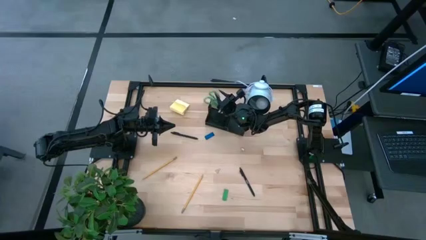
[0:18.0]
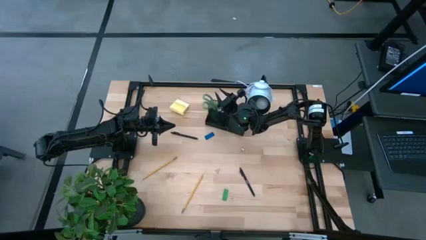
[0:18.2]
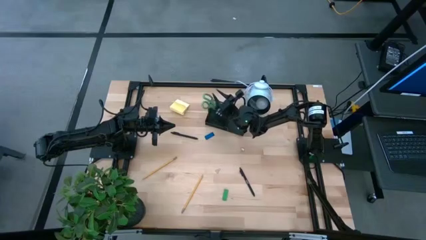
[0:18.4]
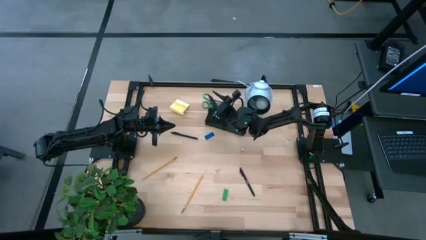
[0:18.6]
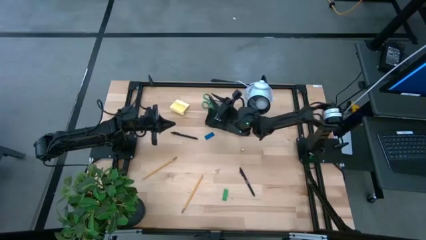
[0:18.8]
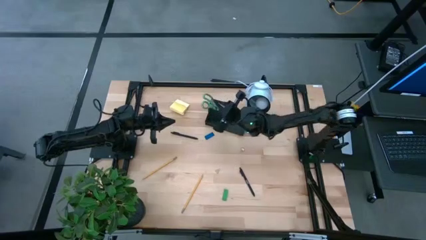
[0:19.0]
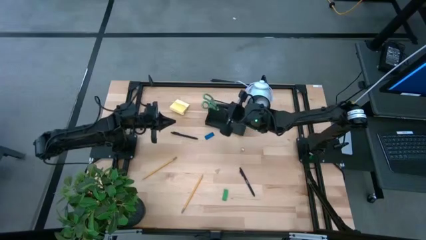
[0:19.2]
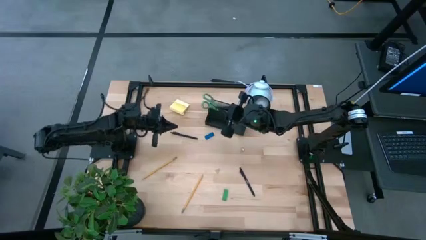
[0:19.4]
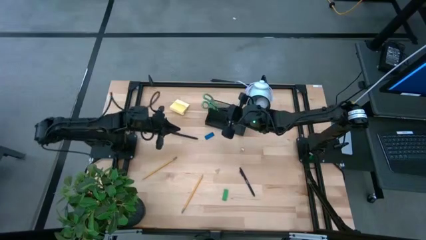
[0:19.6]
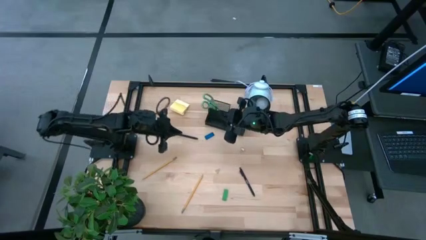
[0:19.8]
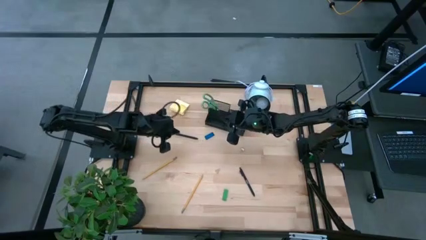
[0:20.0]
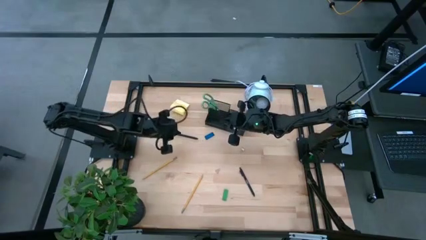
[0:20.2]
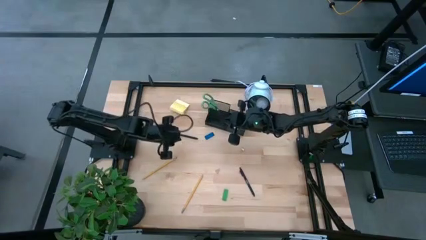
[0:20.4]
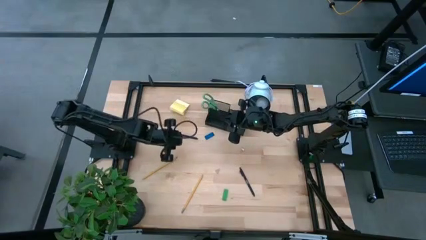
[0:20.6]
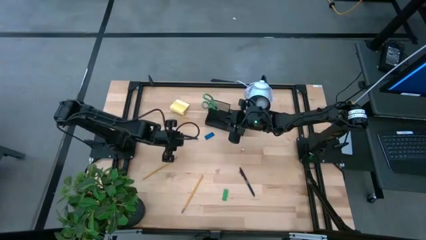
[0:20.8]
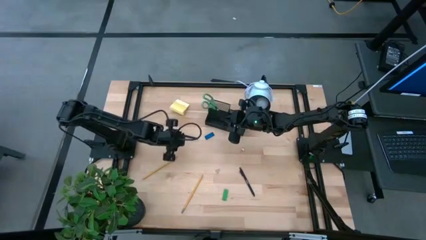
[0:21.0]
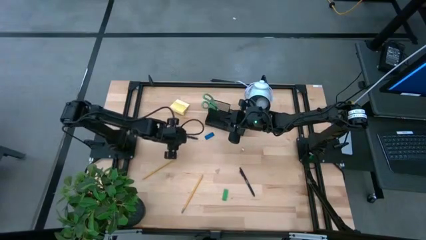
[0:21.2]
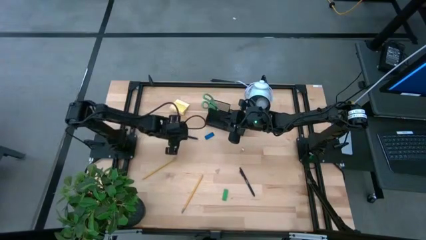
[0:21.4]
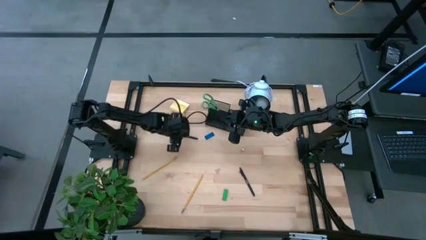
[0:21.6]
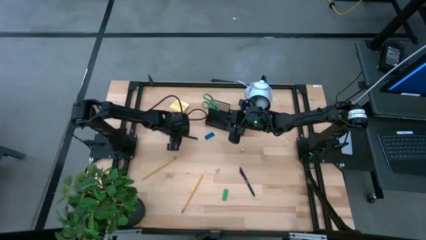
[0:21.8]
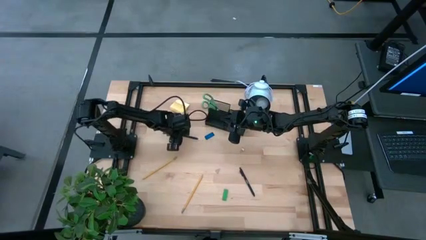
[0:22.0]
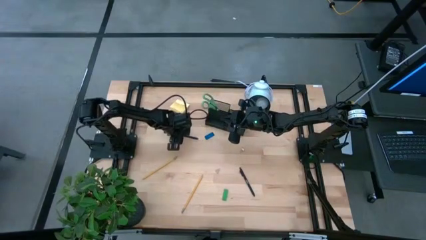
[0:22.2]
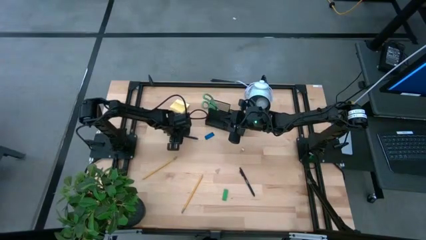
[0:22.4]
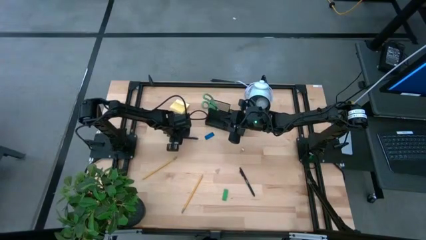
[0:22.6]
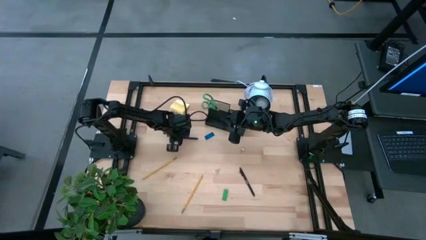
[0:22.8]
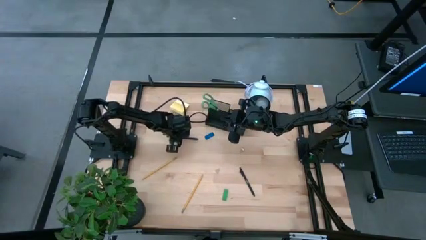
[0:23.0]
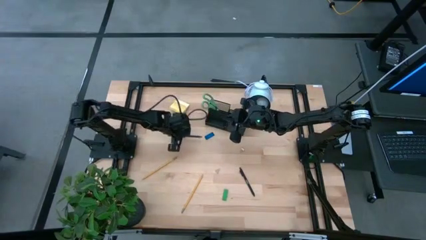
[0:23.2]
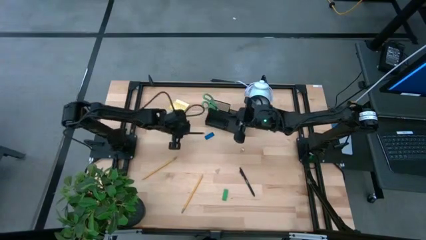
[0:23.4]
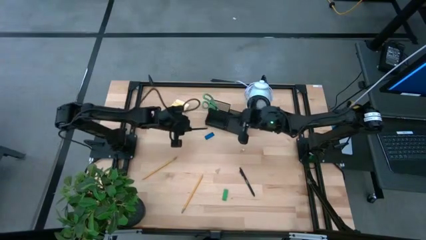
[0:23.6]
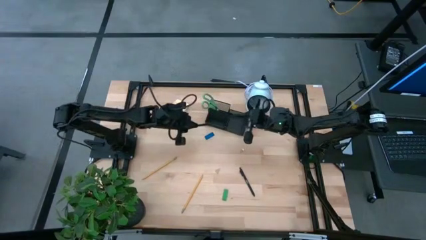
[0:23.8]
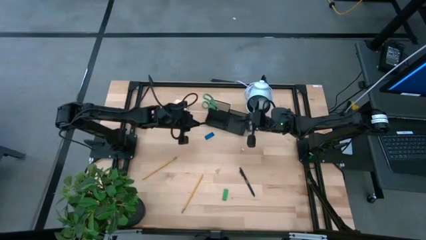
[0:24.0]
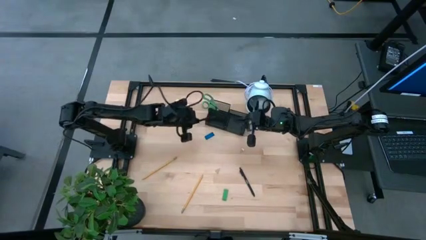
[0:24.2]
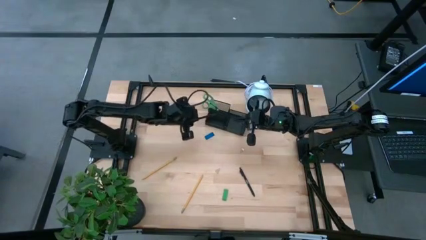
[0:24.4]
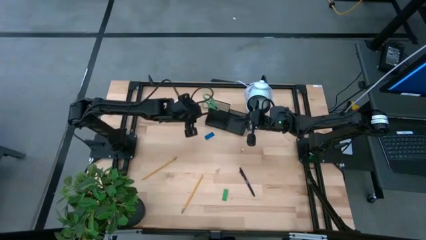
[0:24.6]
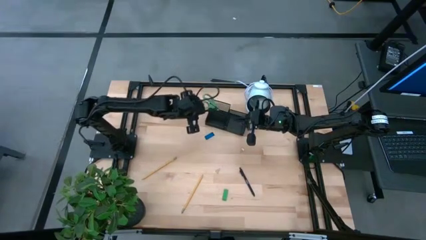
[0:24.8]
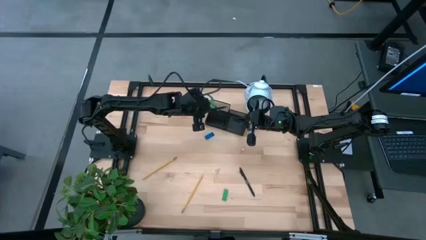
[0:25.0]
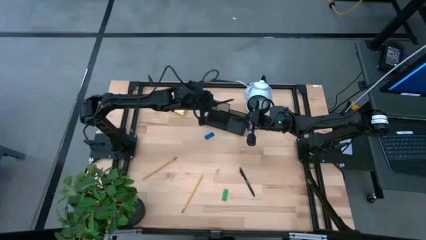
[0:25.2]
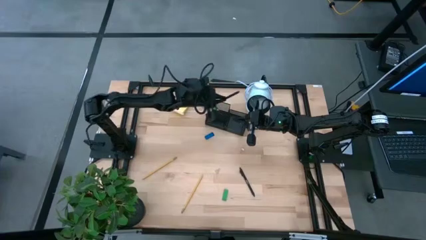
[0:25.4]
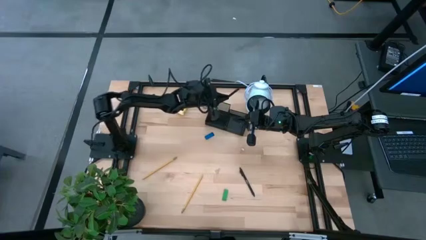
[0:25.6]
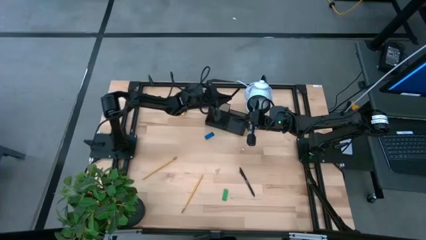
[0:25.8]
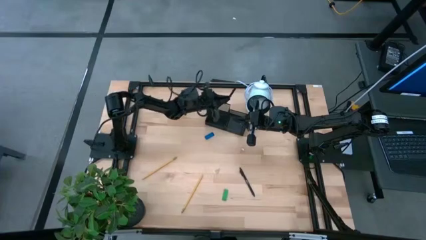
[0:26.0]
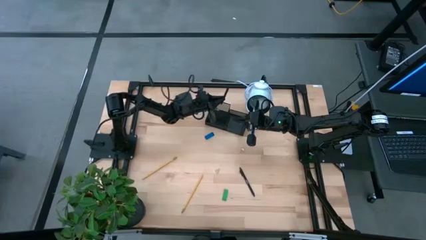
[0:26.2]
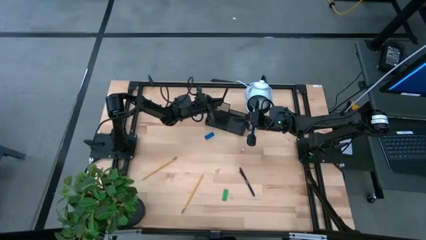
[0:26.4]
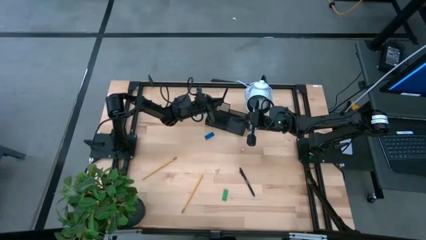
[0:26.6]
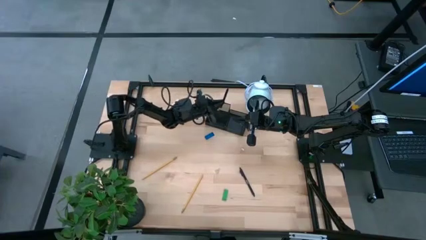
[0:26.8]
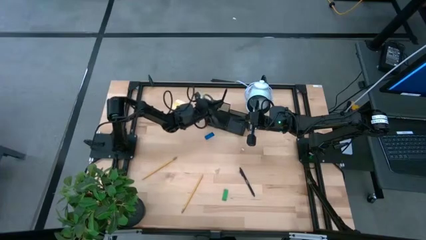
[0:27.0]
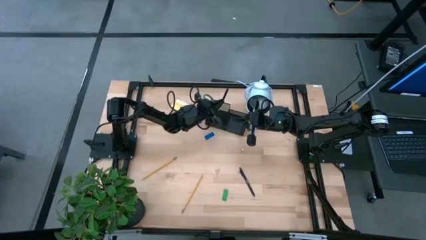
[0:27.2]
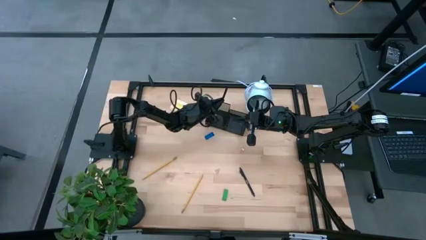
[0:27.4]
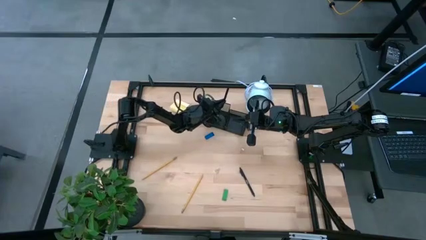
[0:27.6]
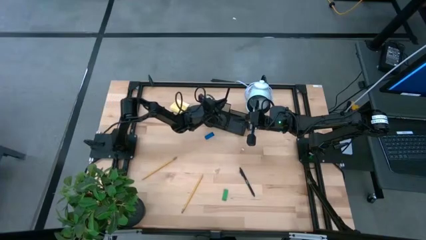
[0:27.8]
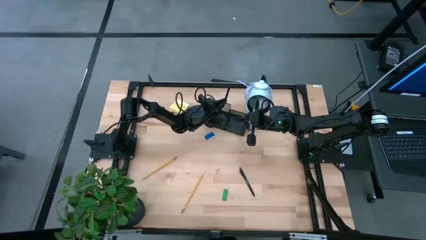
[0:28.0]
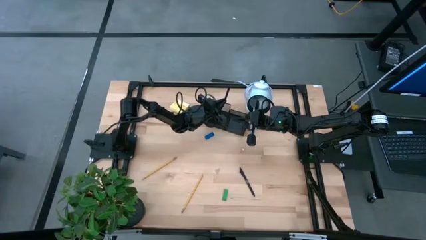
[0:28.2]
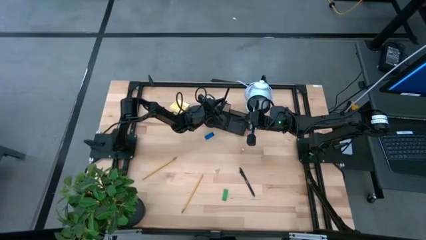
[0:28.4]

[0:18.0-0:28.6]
Task: Pick and place office supplies into organizer
Put the black pen into the black desk organizer

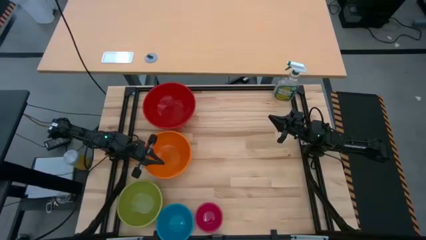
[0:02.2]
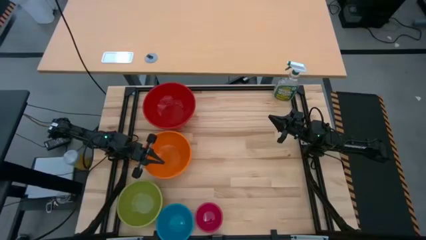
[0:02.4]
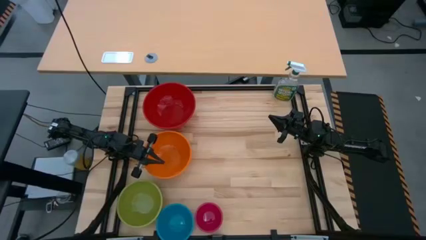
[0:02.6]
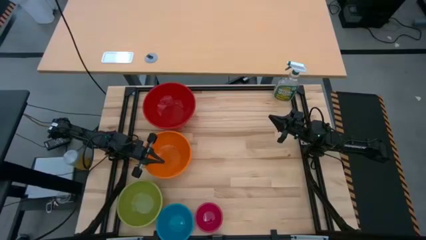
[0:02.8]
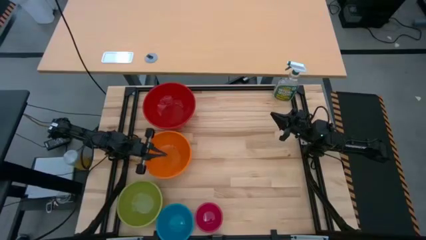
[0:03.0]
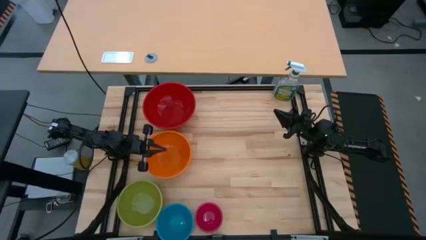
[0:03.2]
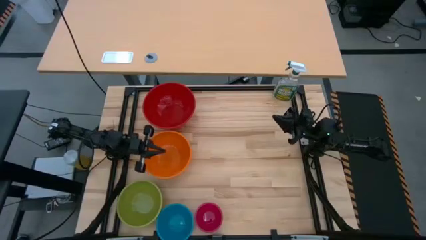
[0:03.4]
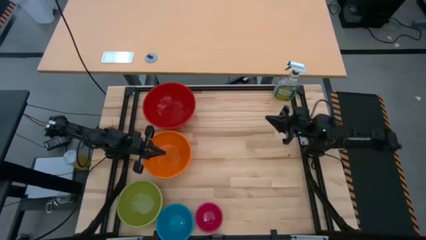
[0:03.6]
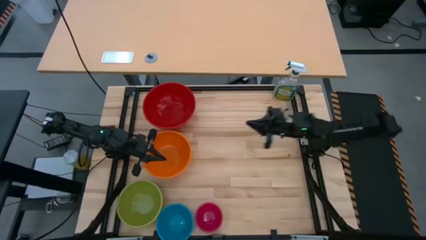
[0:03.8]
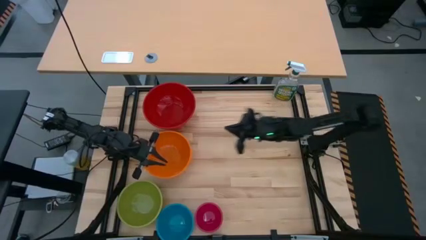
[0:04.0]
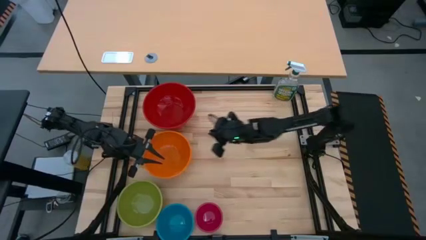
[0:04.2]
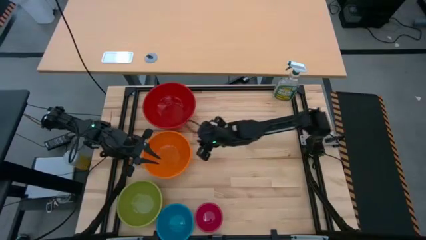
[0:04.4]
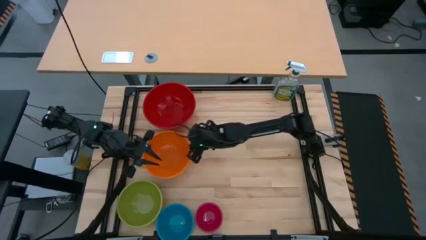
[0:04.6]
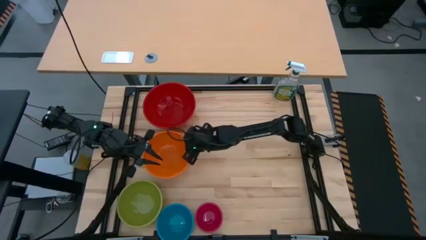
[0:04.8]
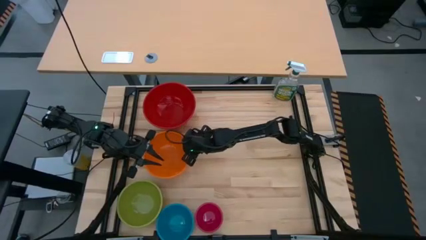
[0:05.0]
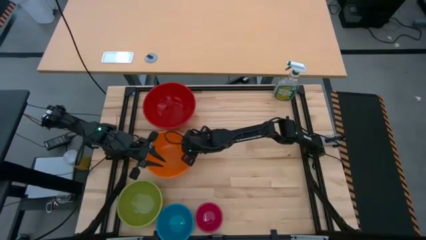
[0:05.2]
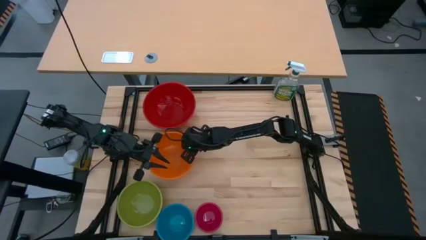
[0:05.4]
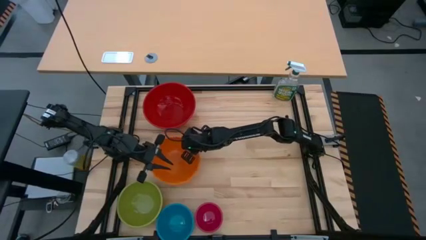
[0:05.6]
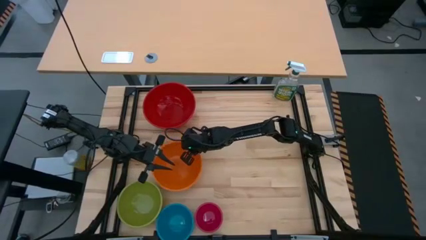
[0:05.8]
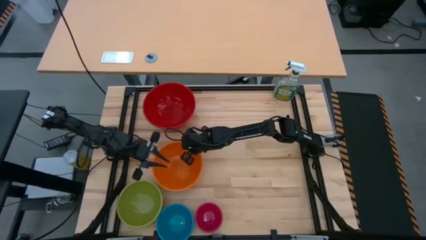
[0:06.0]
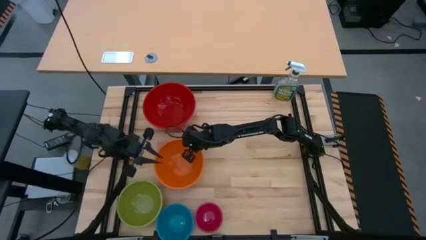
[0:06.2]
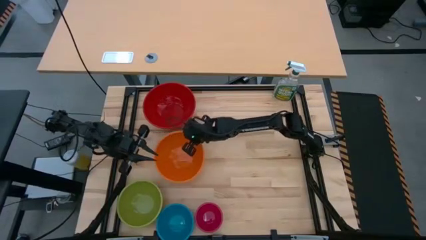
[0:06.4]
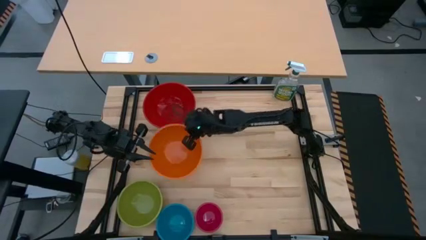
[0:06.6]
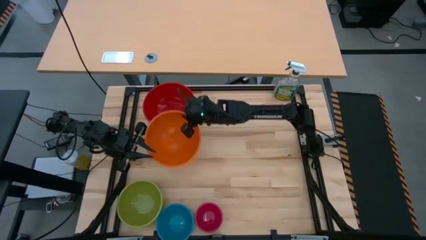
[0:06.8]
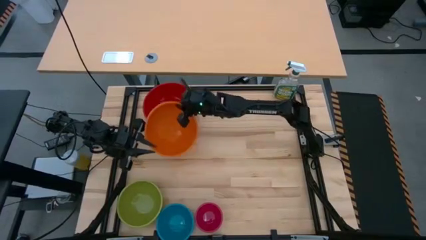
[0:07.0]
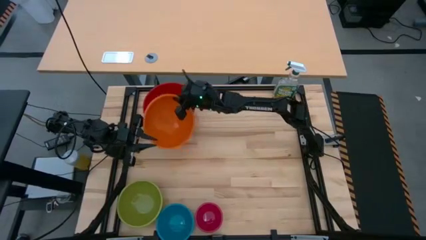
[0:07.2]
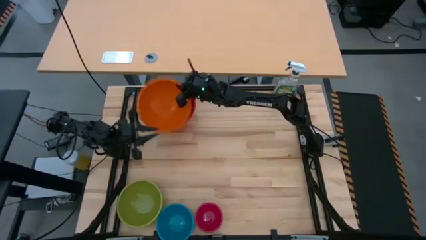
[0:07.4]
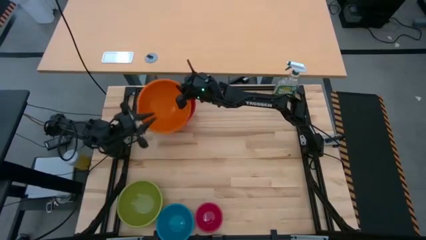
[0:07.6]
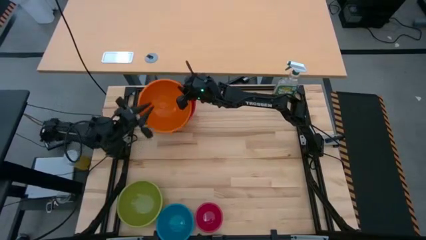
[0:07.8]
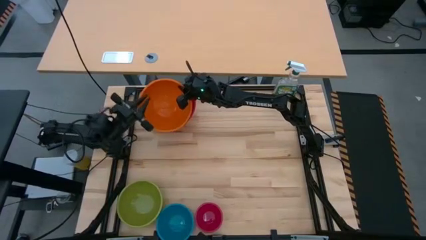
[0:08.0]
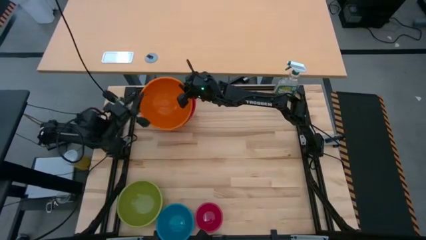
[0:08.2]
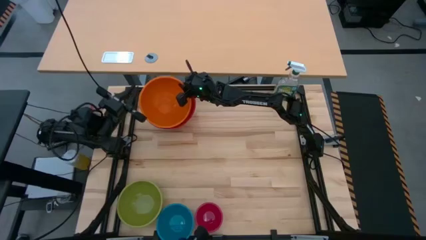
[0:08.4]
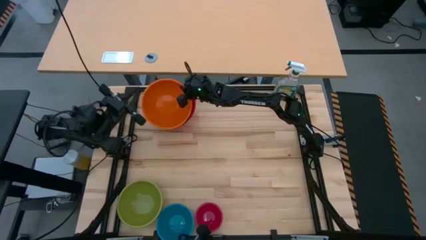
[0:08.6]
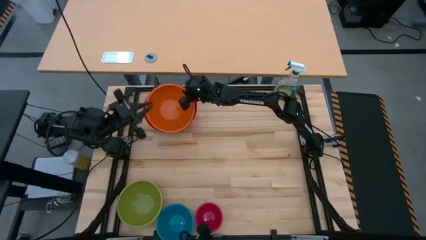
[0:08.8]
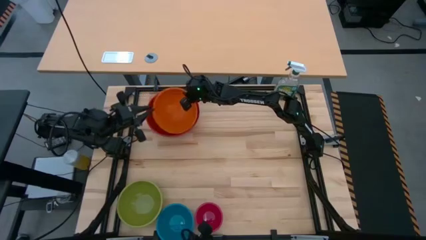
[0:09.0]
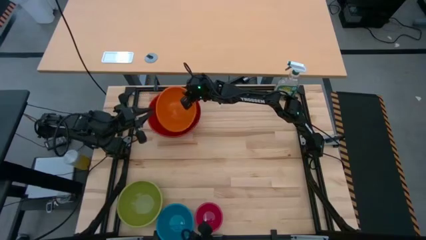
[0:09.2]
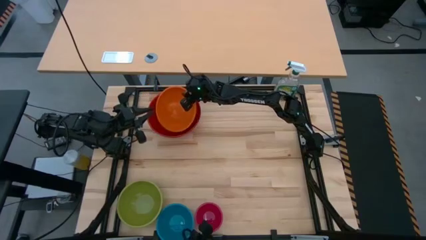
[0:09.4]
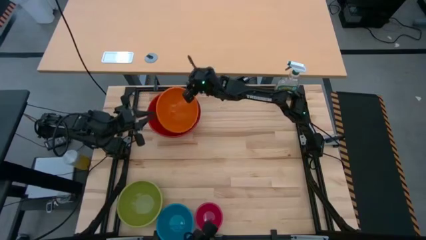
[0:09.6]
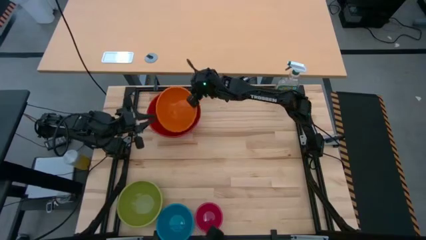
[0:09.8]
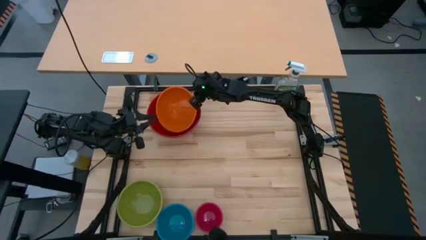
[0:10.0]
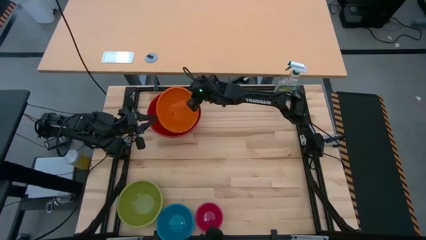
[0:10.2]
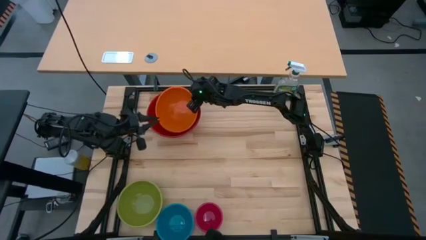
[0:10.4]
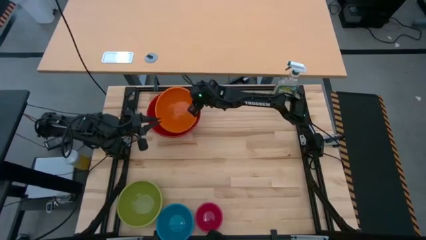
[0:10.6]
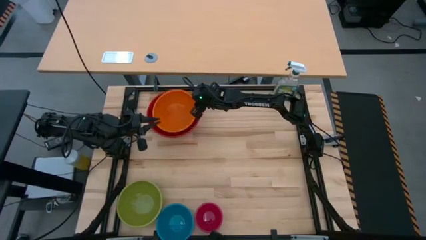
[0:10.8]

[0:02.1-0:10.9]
Task: Nest bowls inside each other by size order
Stack the orange bowl on top of the red bowl
